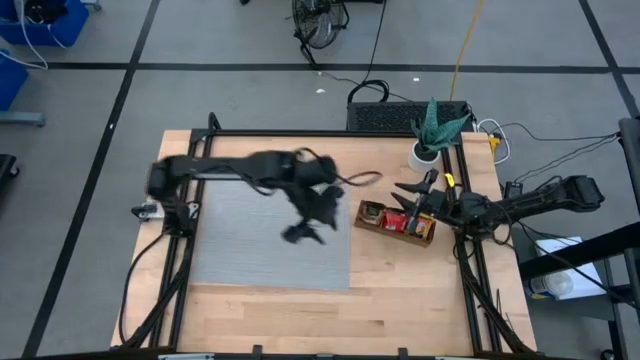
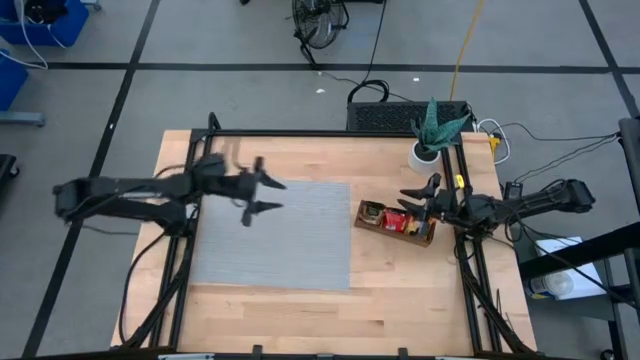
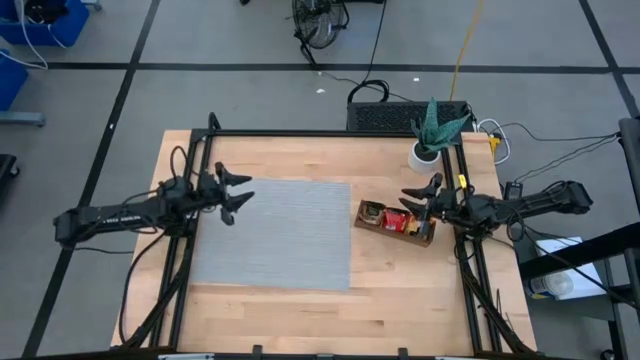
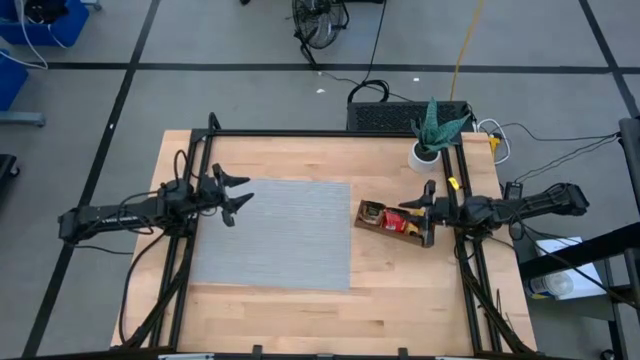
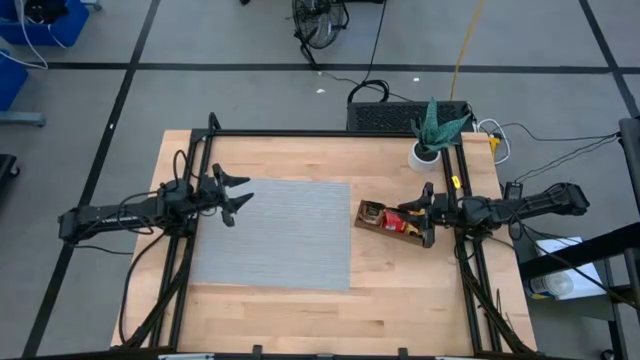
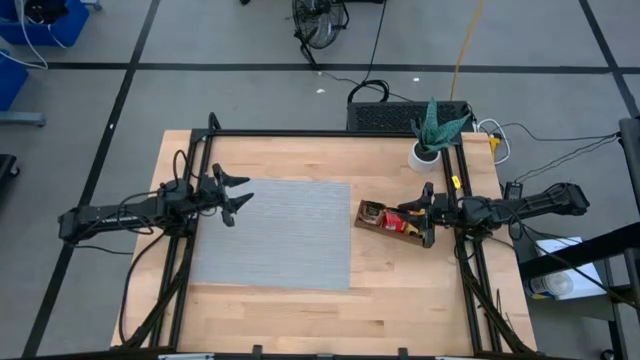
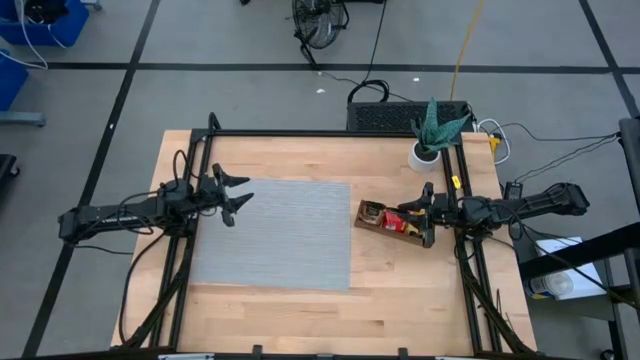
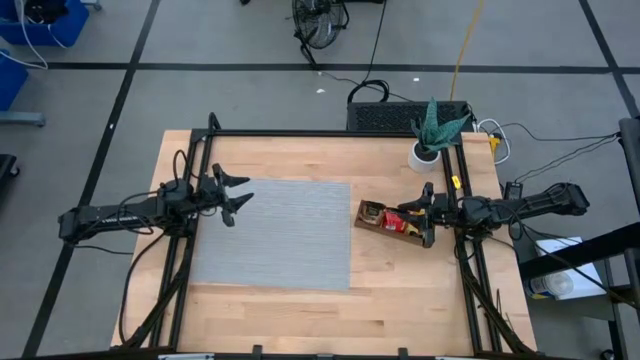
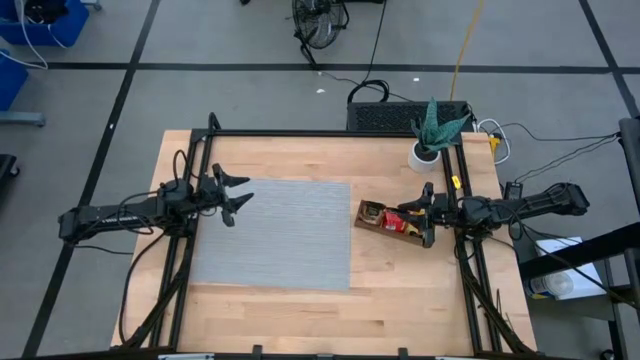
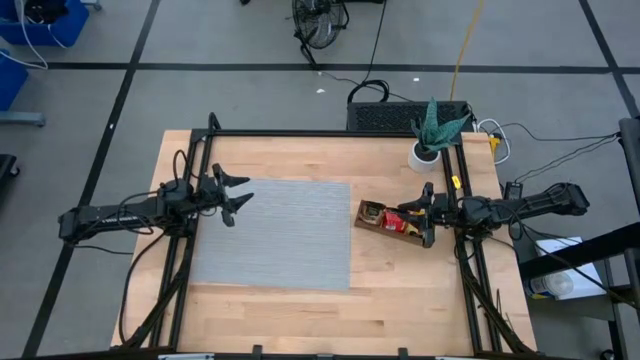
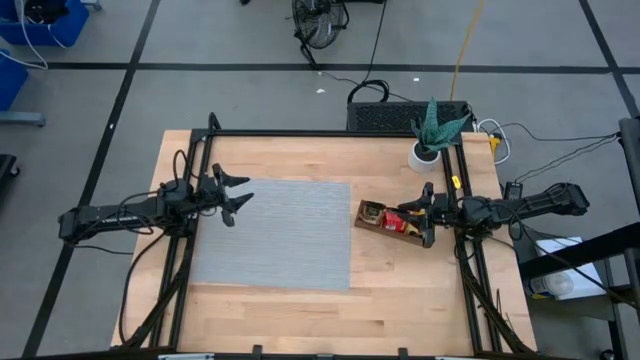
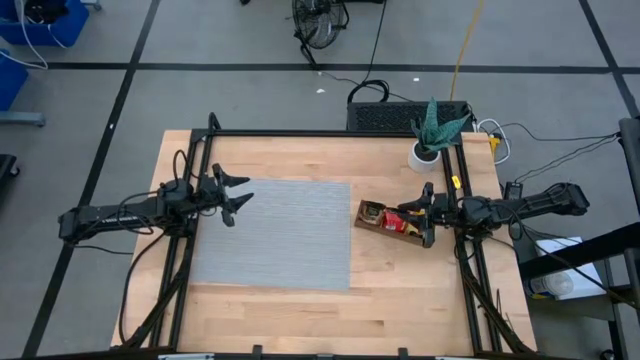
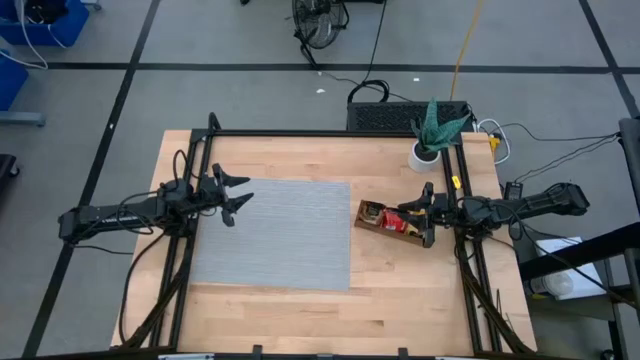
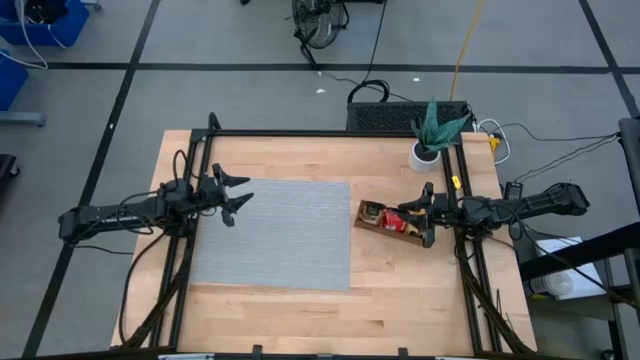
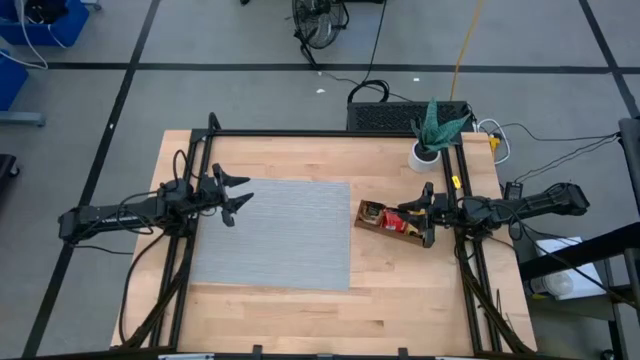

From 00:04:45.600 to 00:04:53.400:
Task: Pick & Place Tea
Return to Home Position

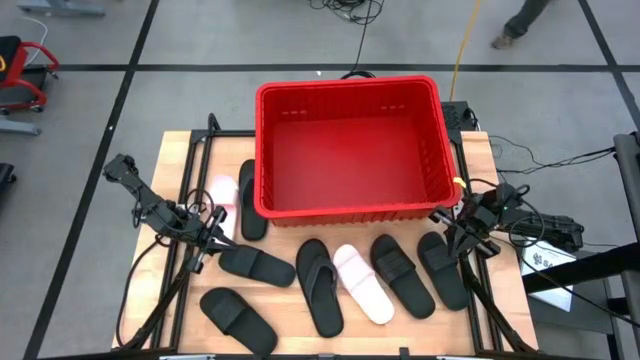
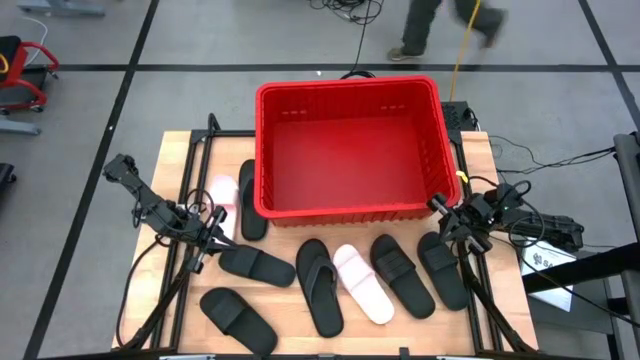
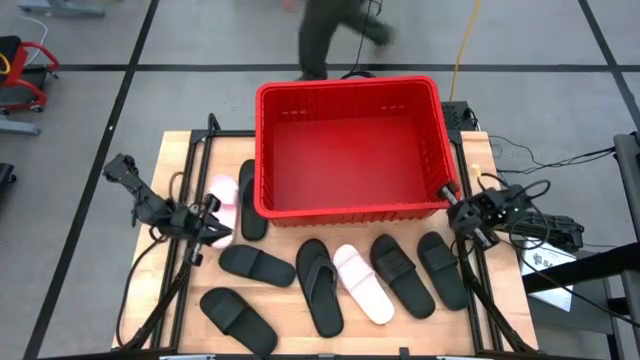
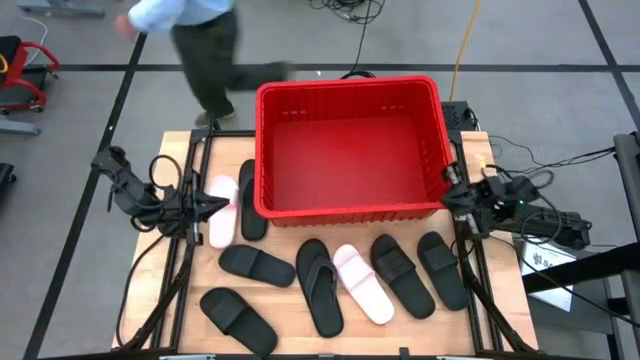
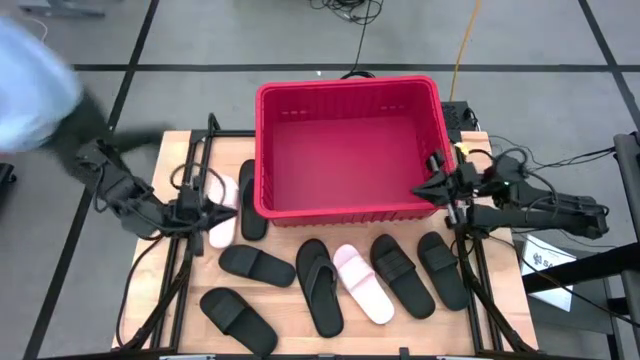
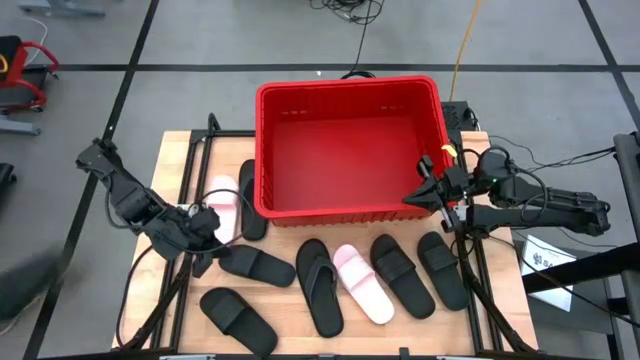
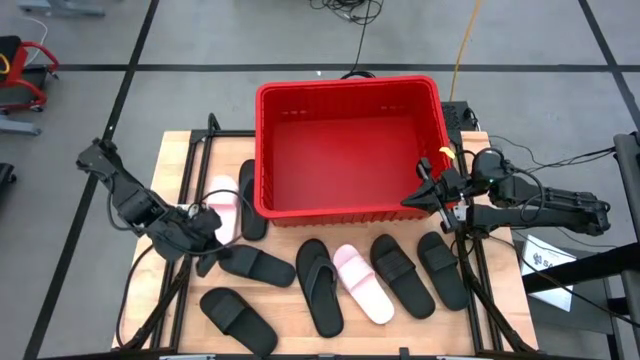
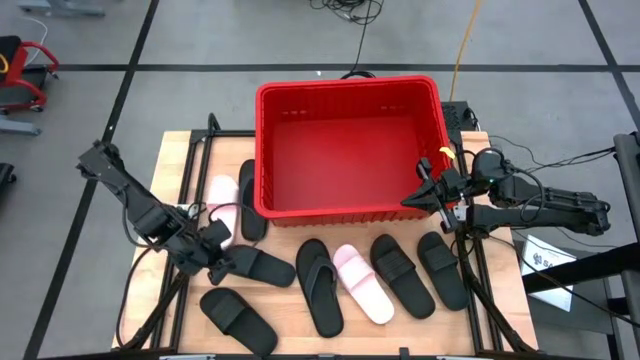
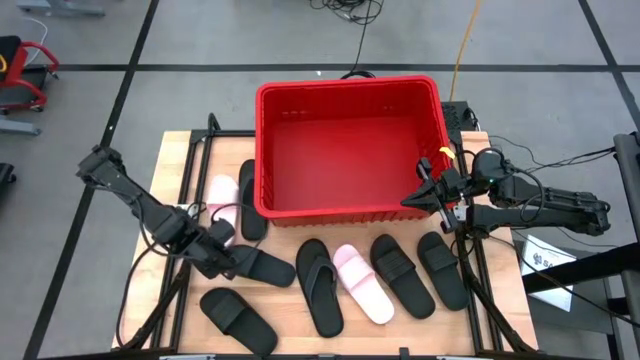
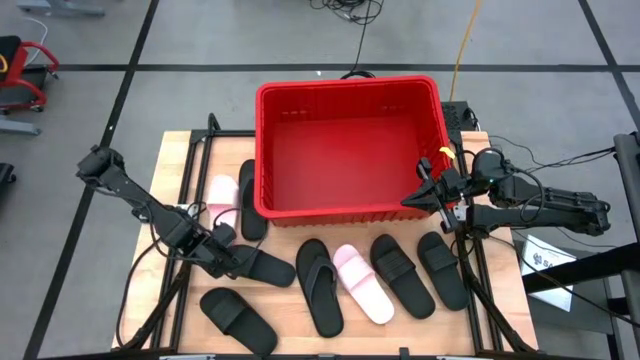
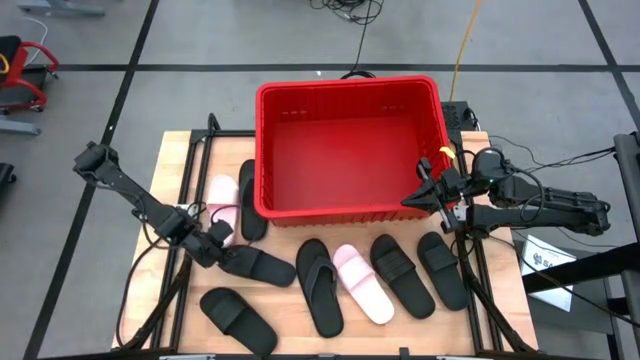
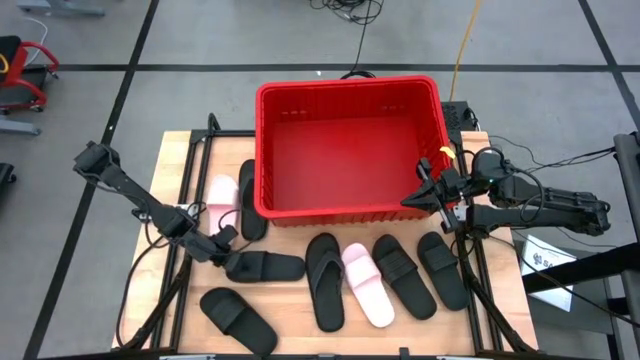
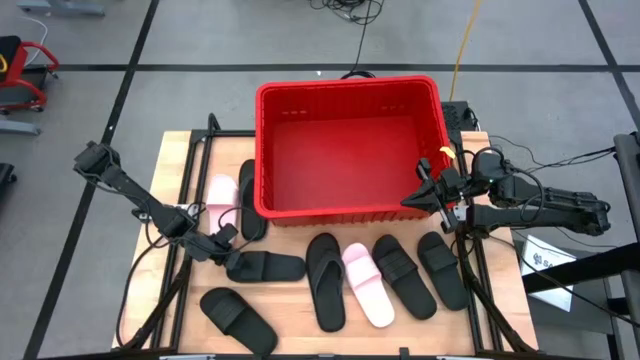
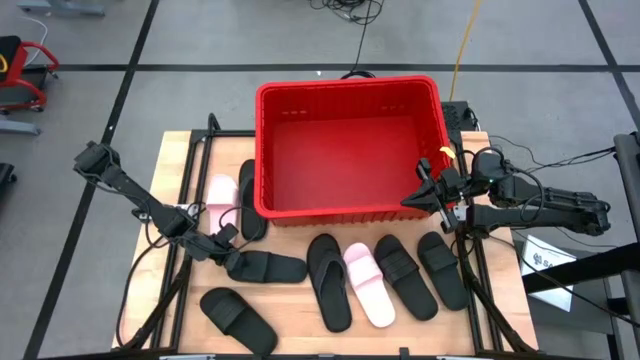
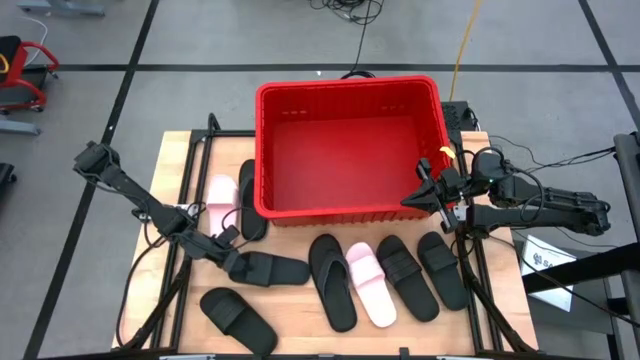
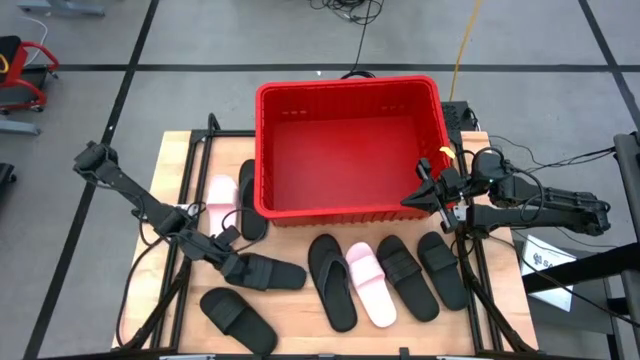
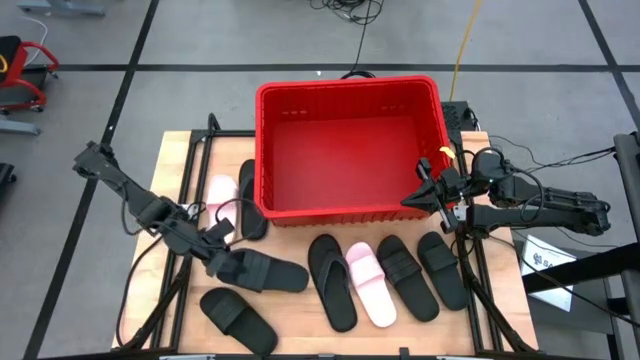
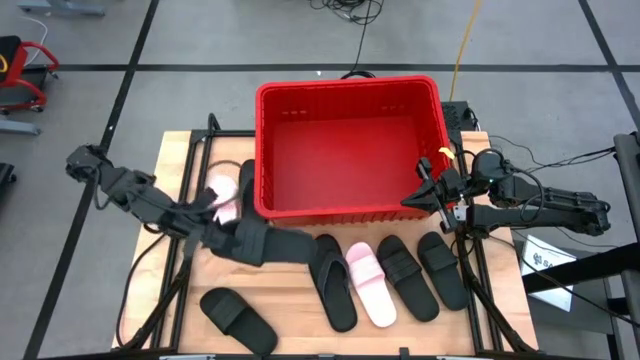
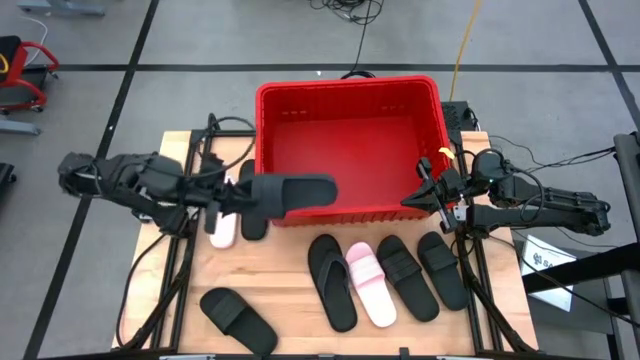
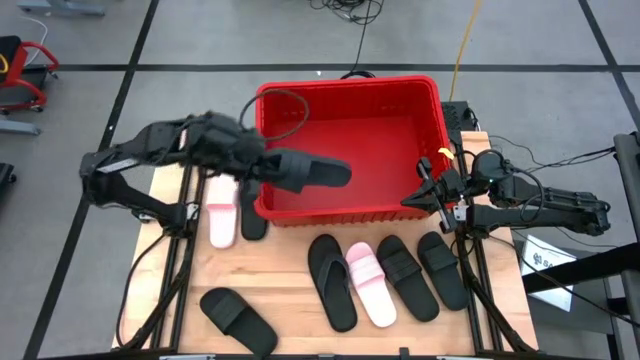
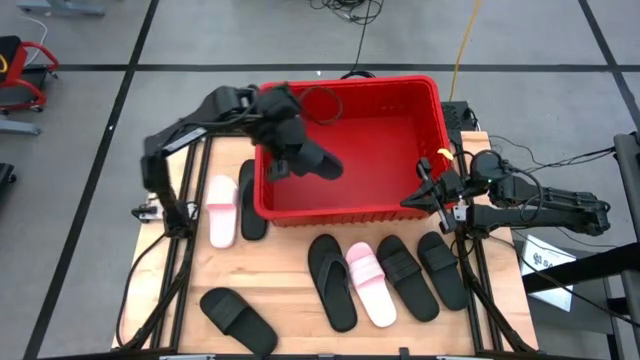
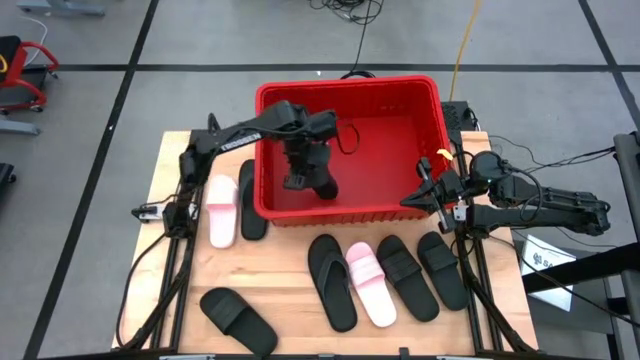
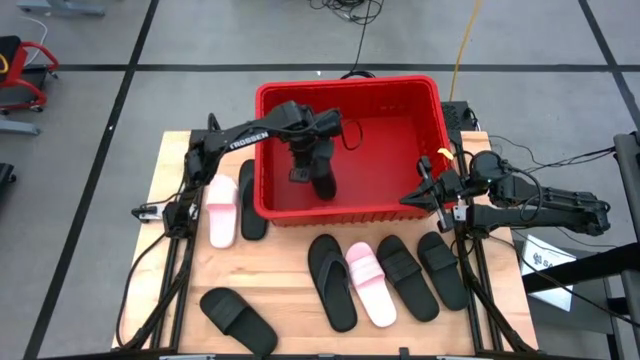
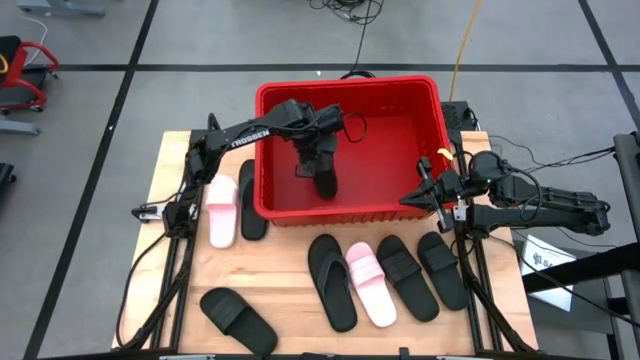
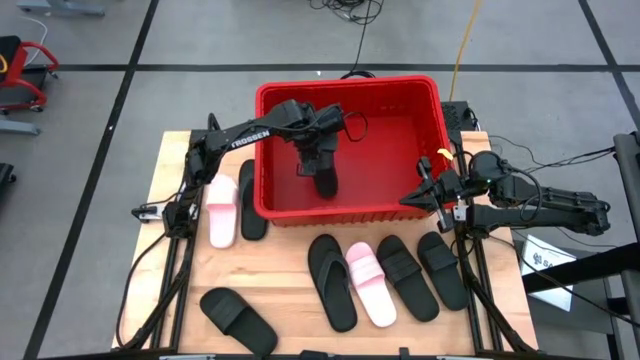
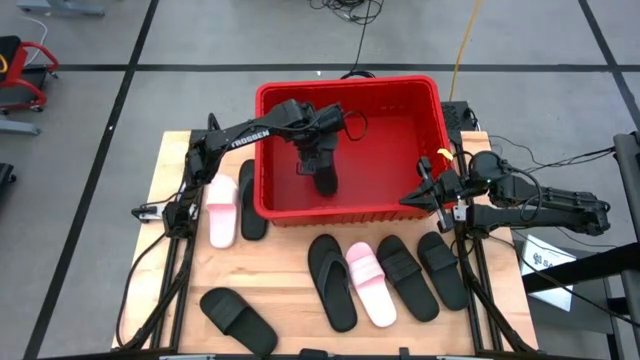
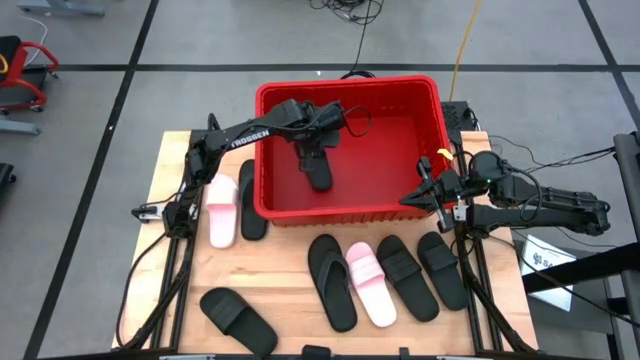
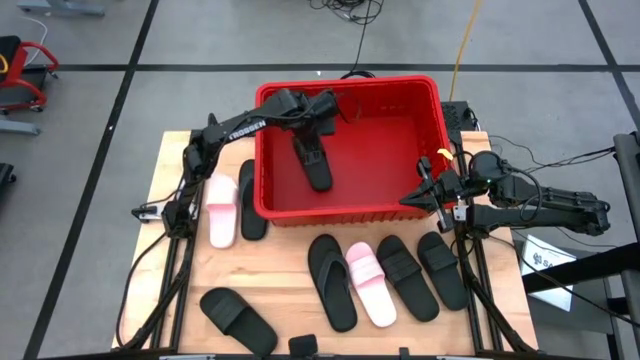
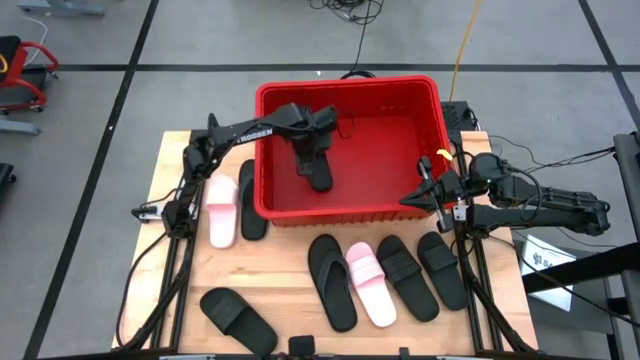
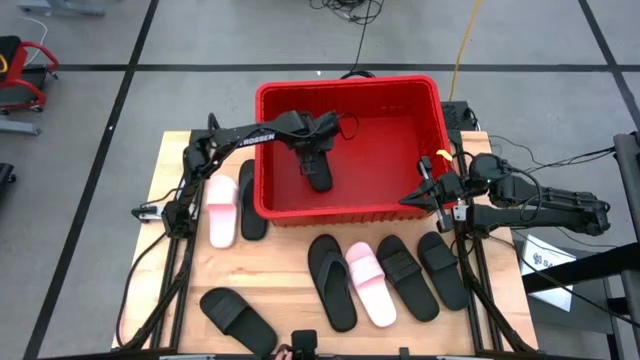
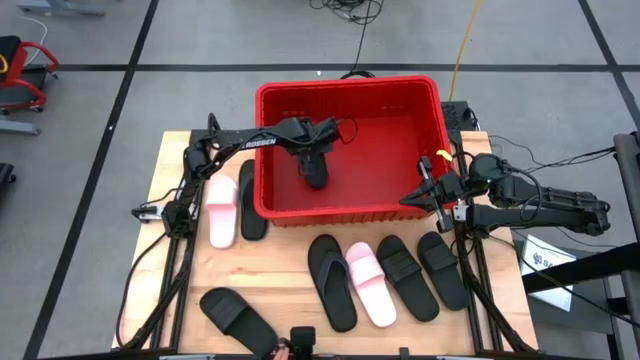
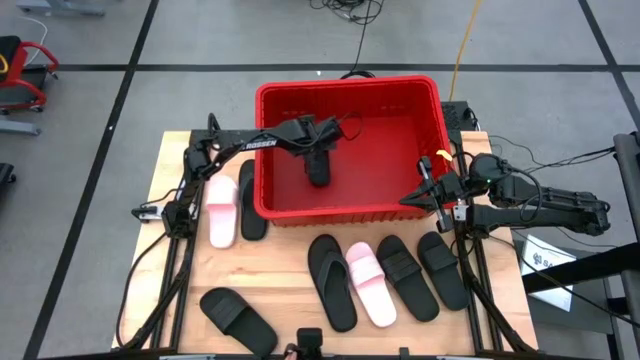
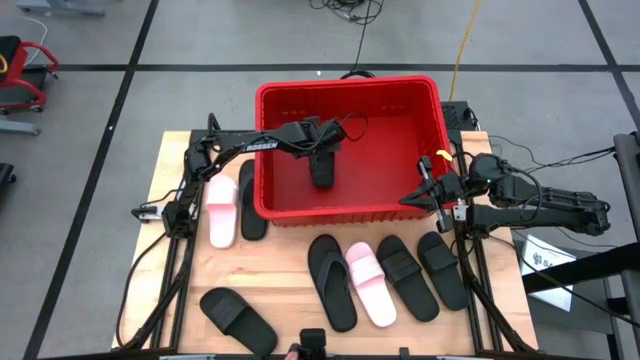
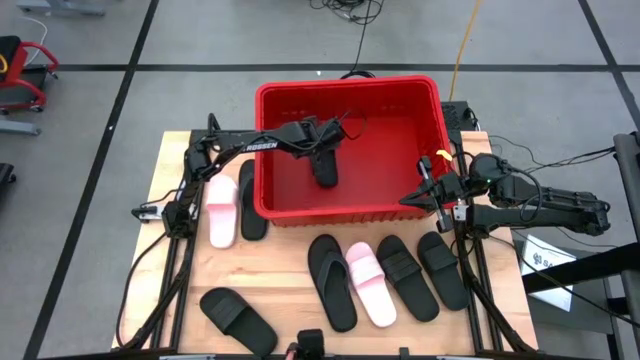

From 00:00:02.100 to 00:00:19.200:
Task: Pick and place slides into bin
Put the black slide into the red bin
